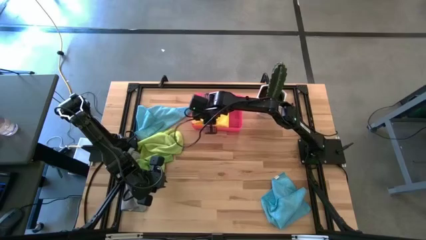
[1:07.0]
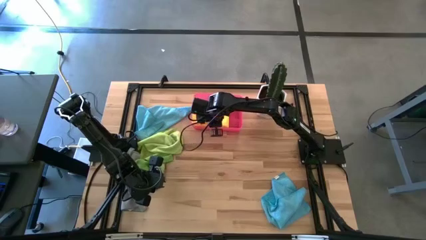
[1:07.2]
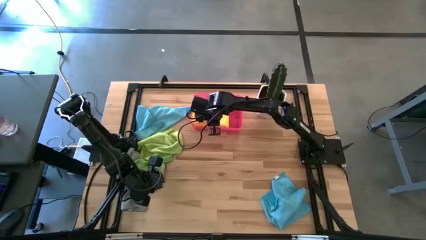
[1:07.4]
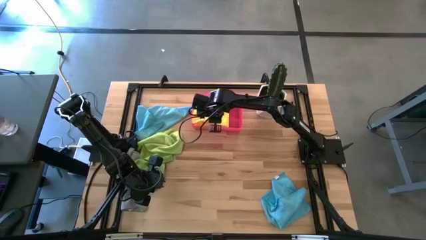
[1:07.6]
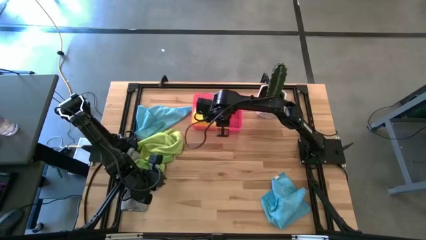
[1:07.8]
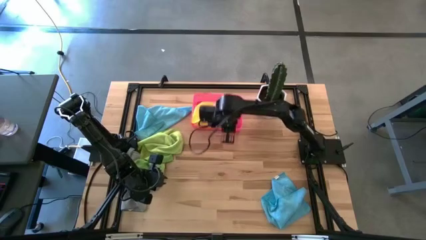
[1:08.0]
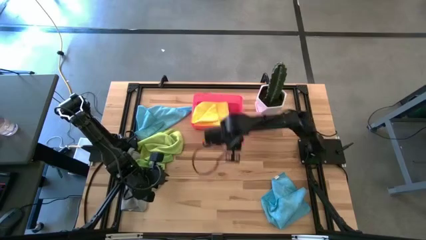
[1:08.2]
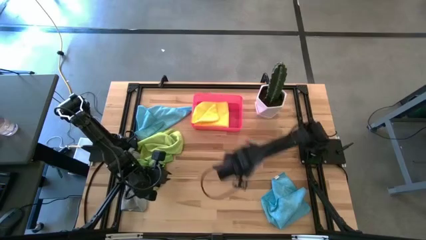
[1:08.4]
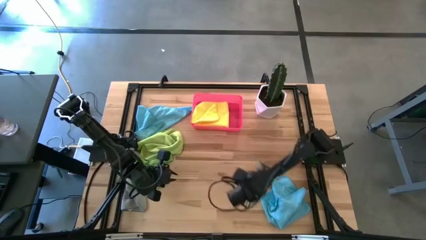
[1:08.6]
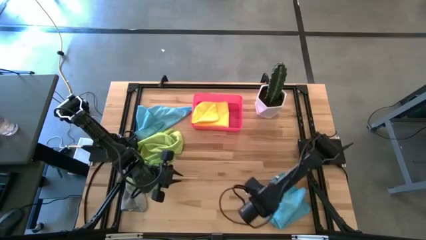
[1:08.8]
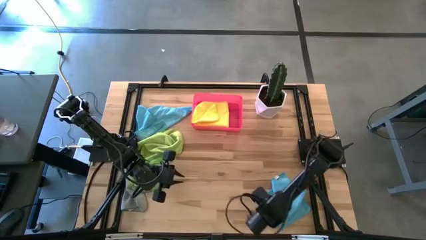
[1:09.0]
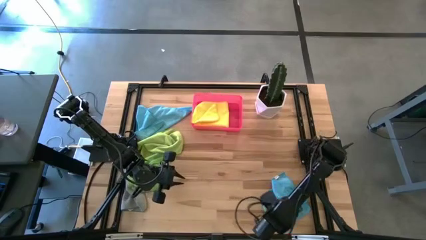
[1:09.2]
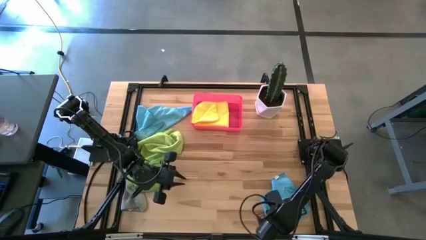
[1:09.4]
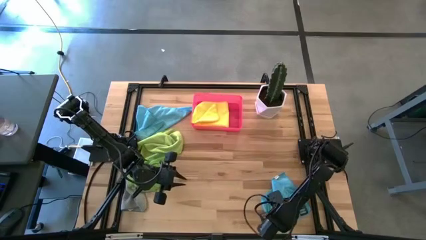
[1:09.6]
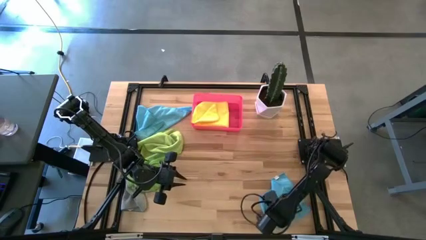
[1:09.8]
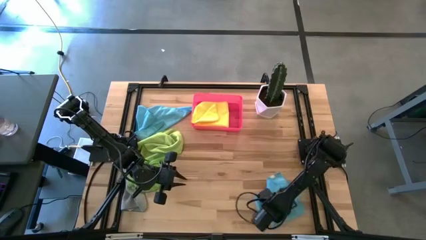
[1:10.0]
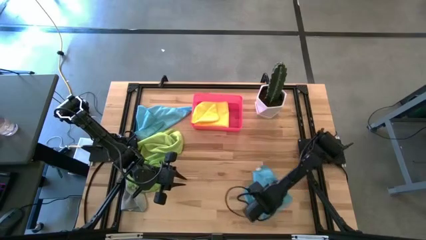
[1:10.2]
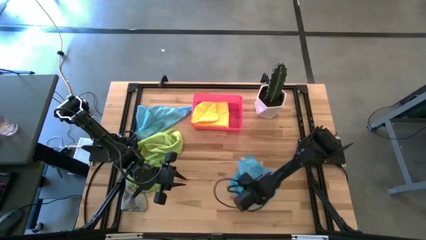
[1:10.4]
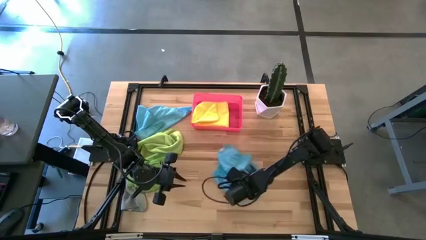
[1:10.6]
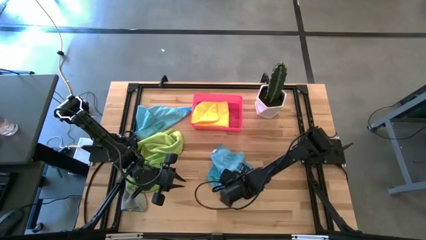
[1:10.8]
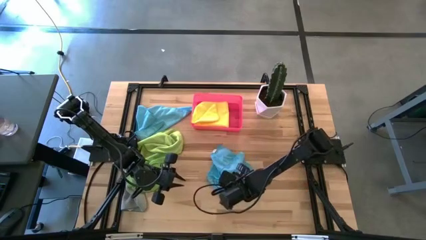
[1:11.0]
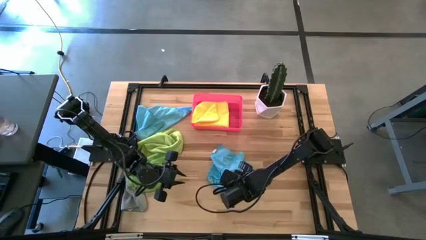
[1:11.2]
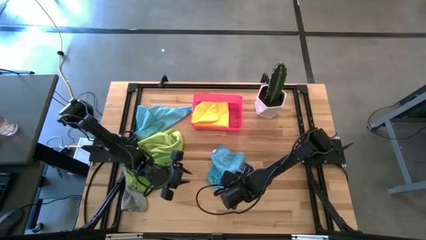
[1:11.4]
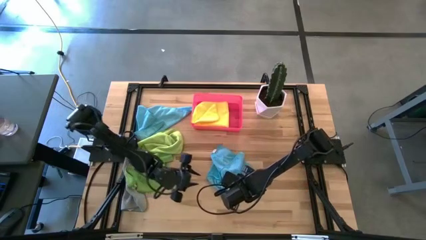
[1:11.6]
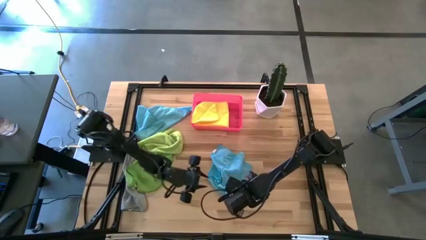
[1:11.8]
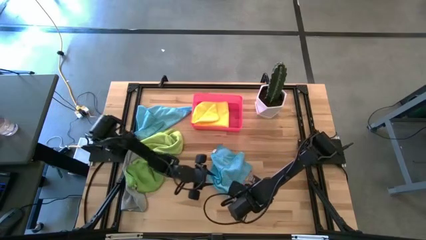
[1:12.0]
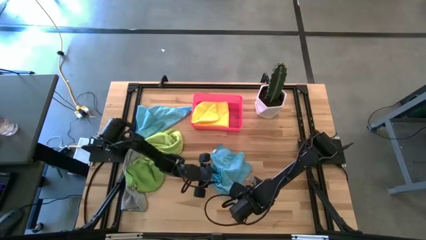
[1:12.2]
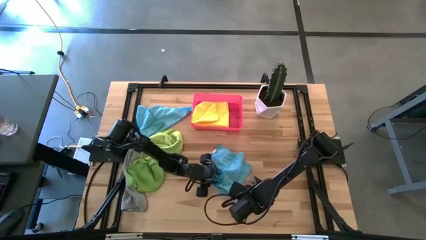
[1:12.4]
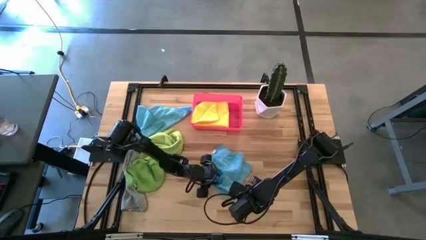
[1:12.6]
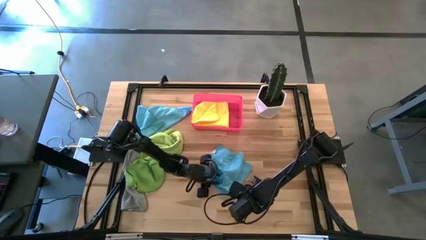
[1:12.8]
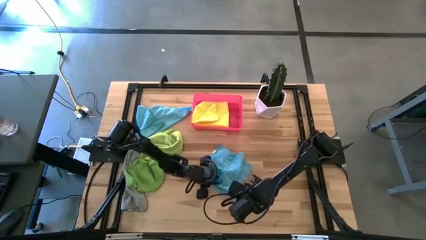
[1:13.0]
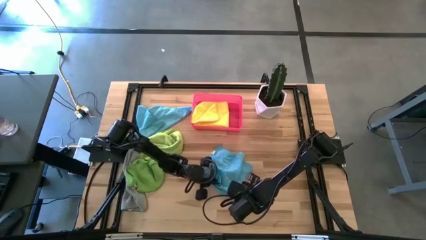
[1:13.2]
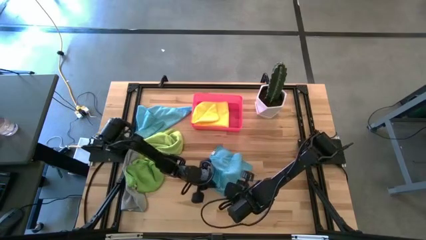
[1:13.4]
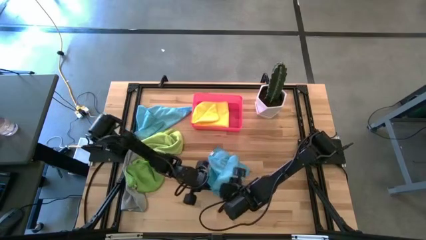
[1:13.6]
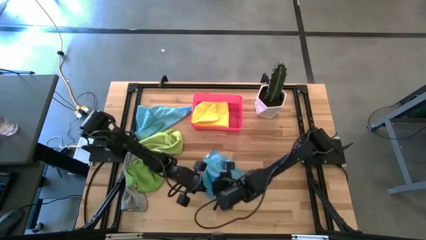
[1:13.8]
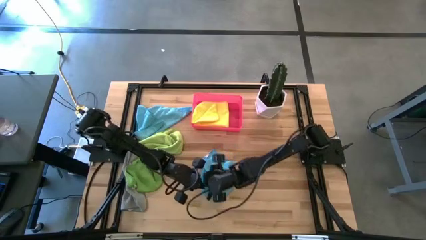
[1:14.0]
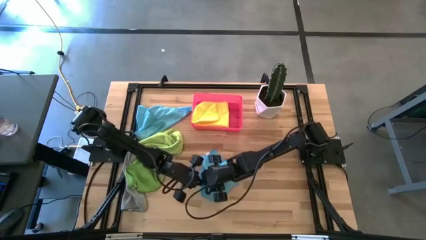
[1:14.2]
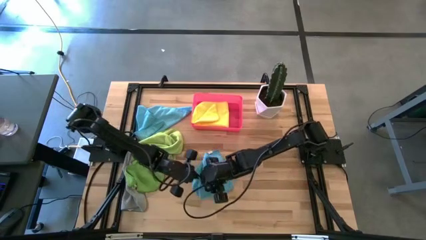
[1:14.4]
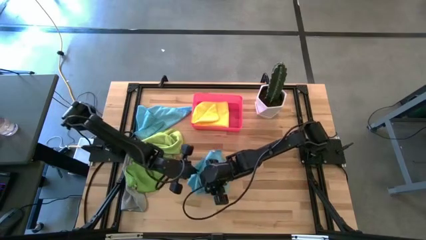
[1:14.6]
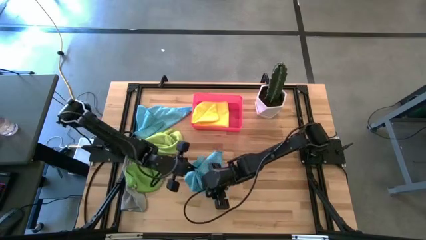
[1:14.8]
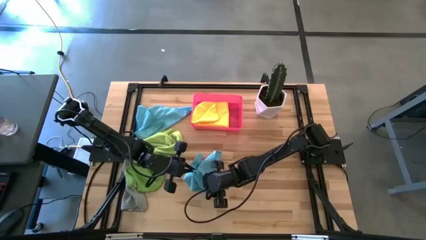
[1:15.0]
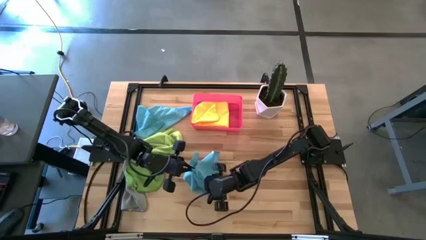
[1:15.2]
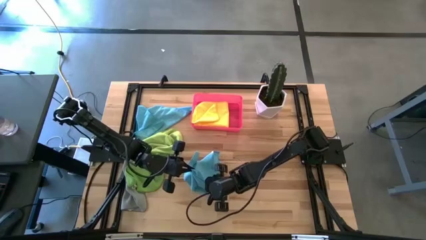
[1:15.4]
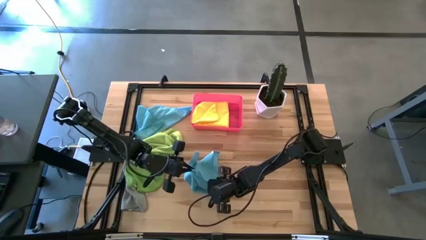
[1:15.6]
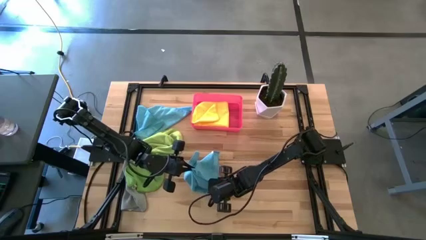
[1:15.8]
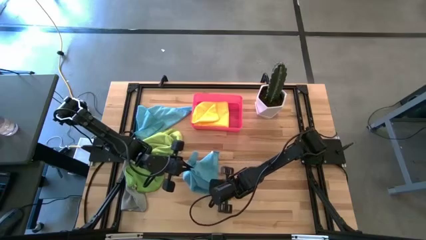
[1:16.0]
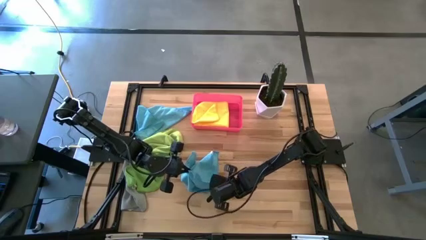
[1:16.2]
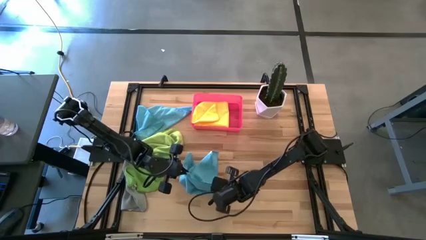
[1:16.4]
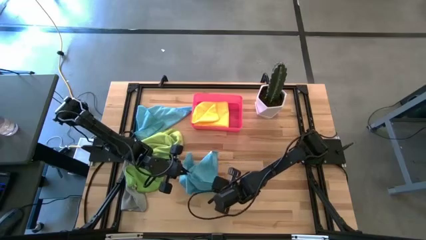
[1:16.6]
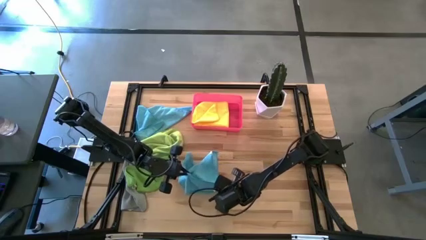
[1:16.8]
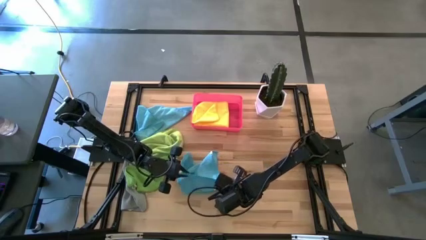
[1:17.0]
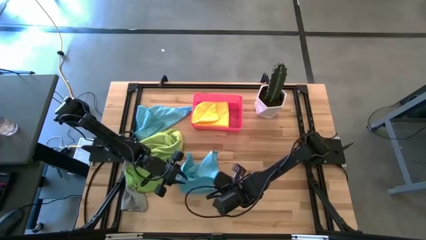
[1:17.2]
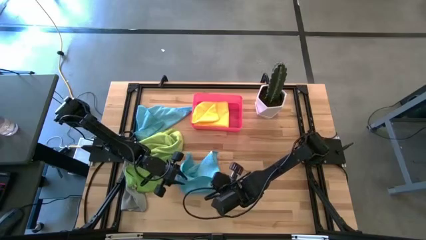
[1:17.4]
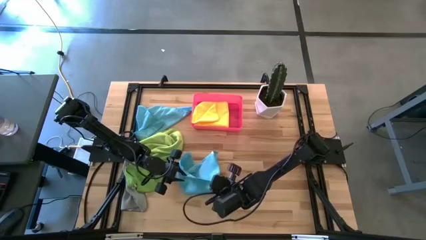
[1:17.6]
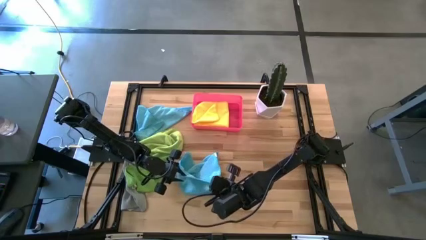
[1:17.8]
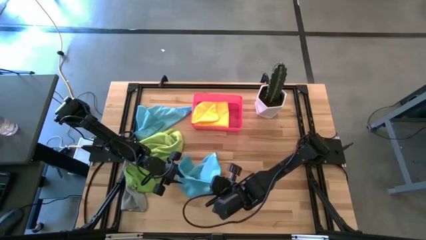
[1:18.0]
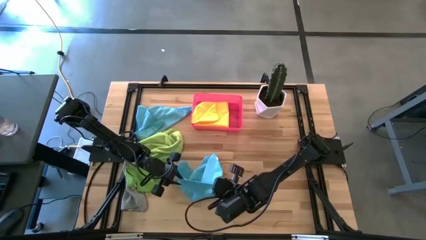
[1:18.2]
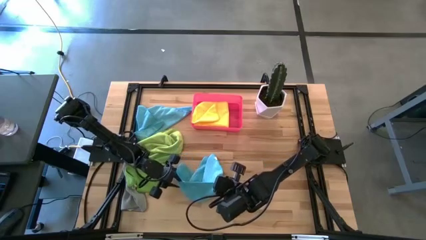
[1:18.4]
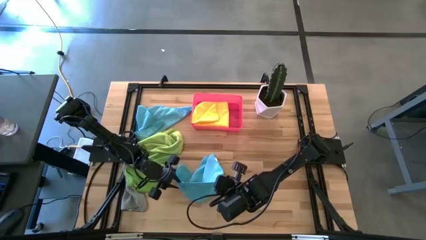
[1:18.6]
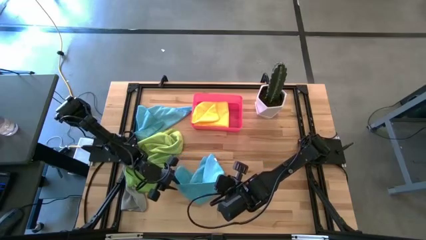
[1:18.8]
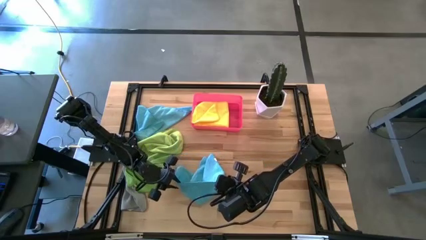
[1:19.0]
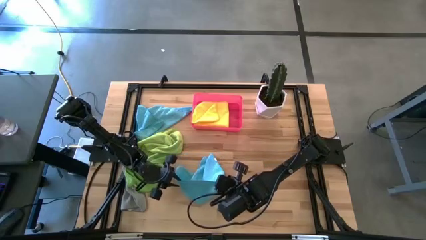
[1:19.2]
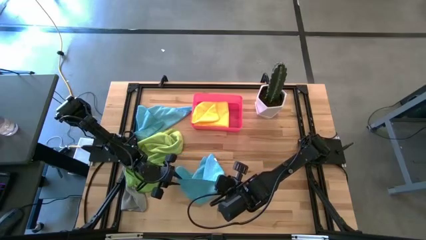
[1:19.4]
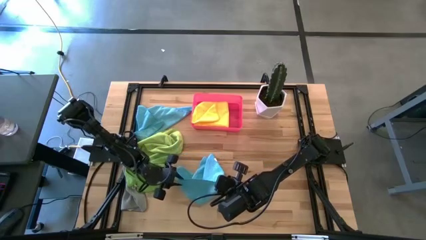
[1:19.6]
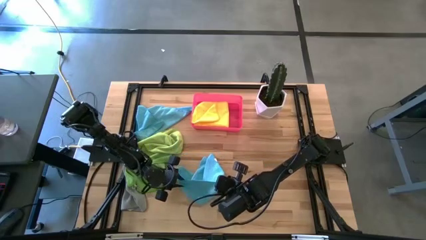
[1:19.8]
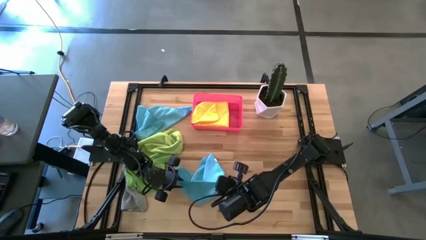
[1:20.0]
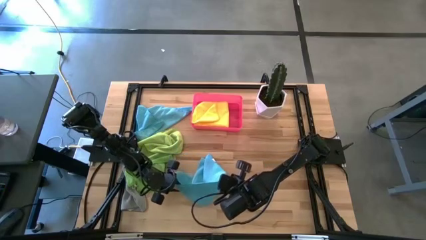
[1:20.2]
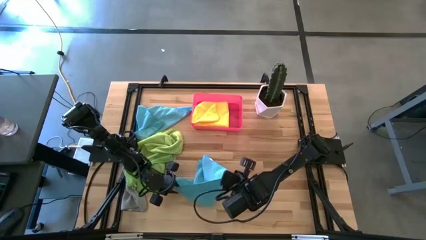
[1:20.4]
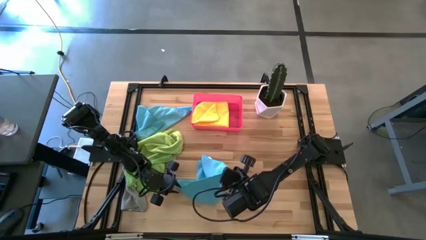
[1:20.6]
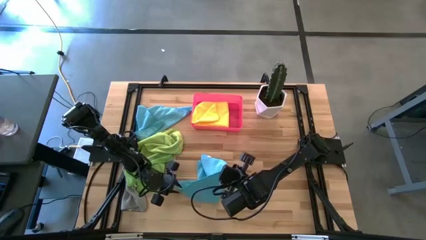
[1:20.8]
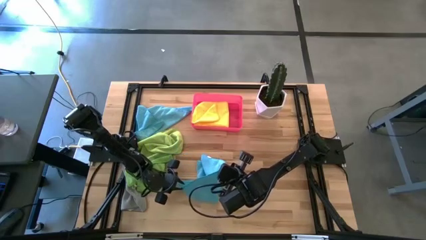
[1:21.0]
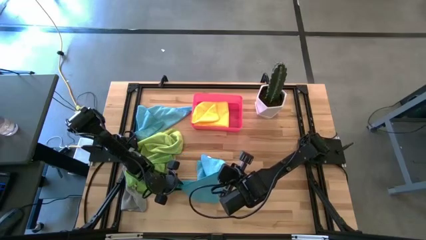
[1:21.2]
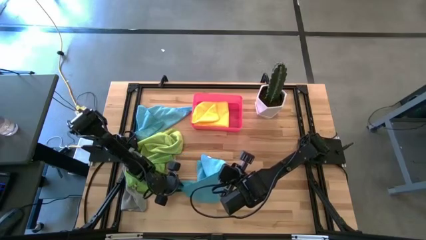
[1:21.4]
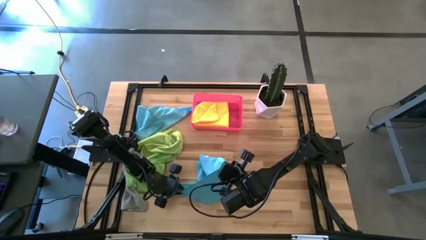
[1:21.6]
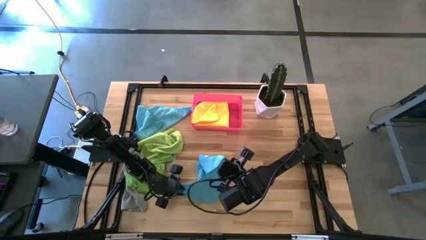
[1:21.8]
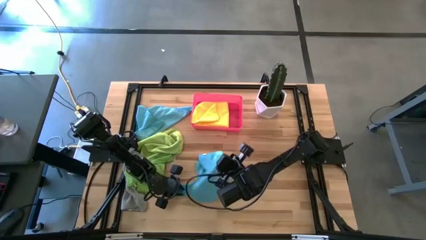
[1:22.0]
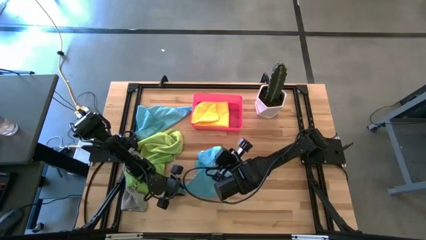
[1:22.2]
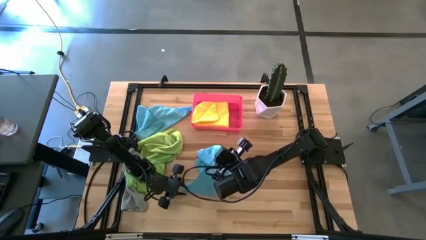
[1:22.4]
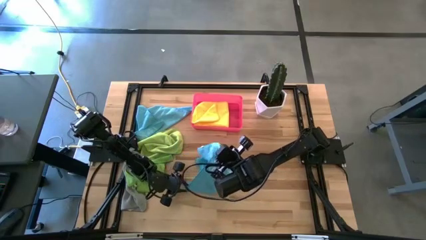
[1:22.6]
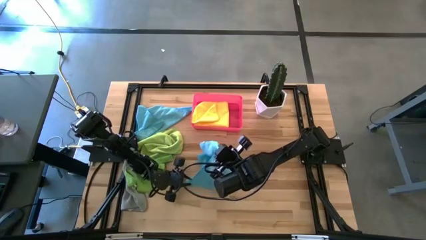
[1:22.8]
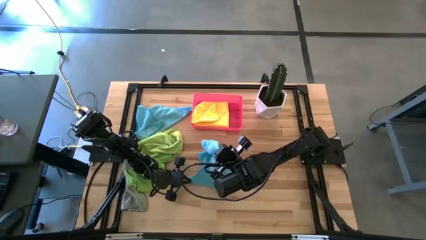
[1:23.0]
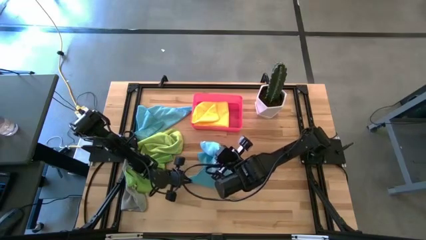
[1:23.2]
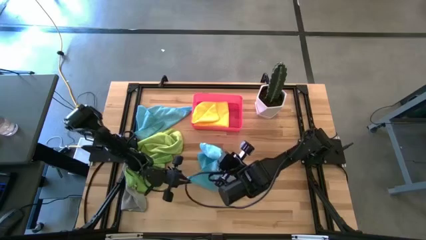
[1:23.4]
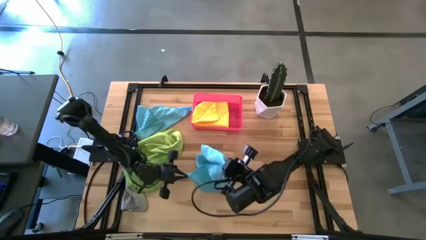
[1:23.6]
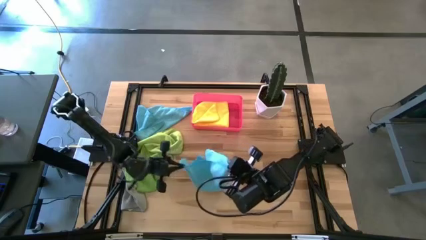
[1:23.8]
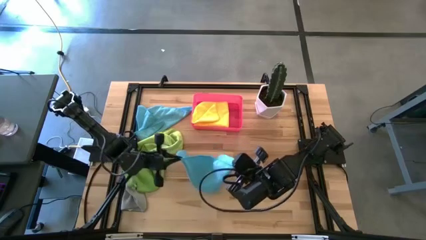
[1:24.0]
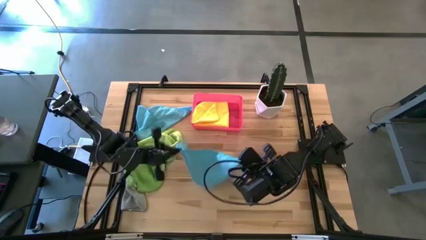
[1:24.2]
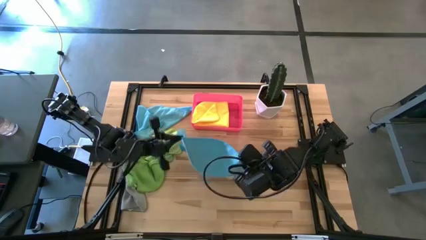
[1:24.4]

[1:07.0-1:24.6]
Task: Fold microfiber towels
Fold the bottom light blue microfiber cloth on the table
